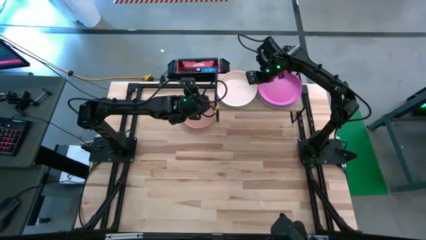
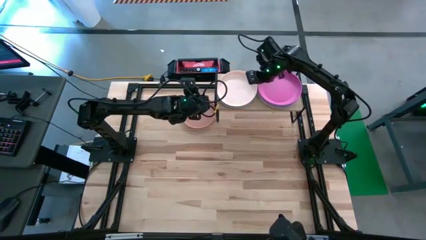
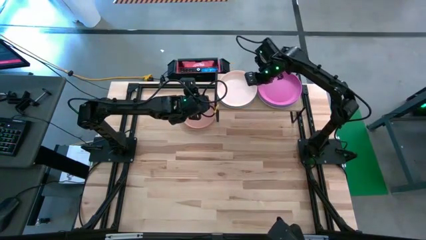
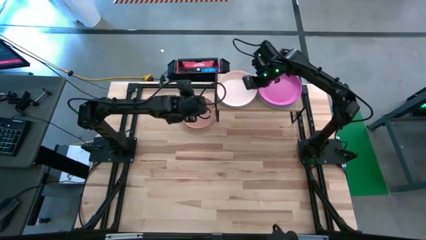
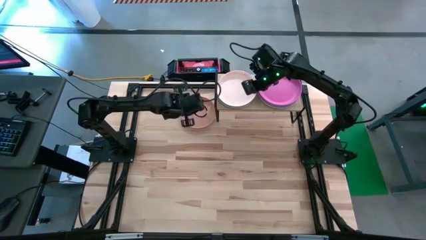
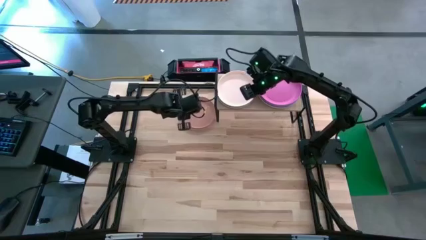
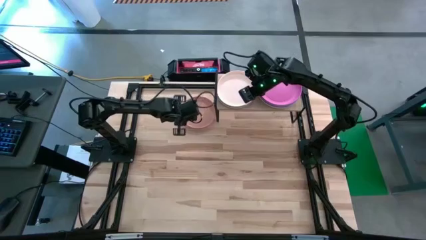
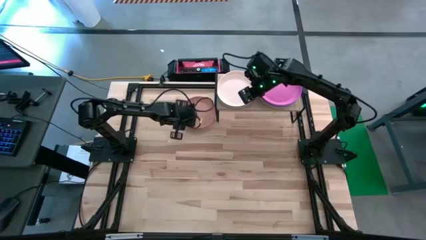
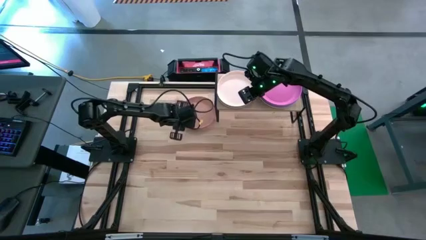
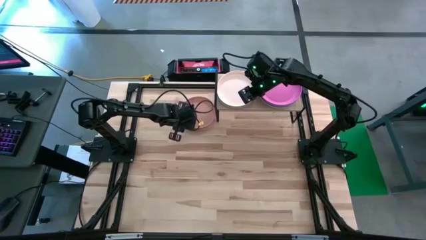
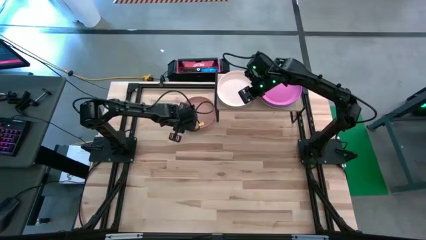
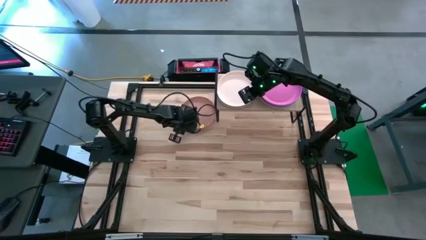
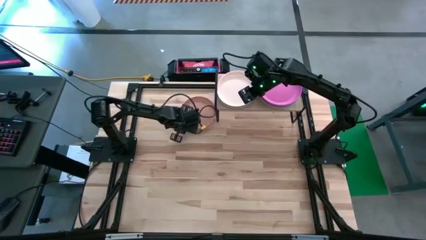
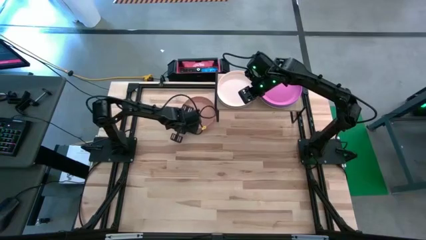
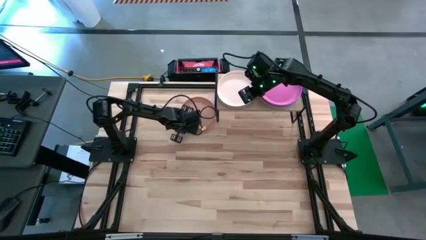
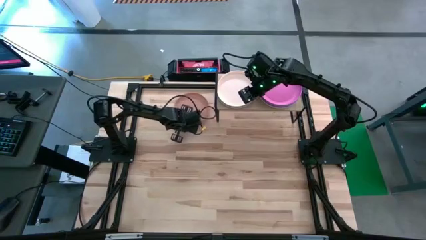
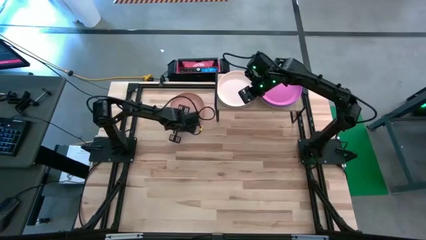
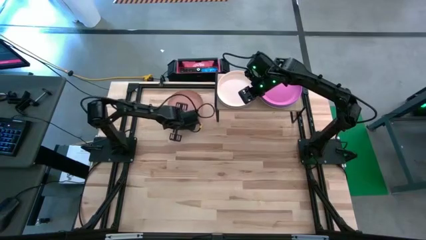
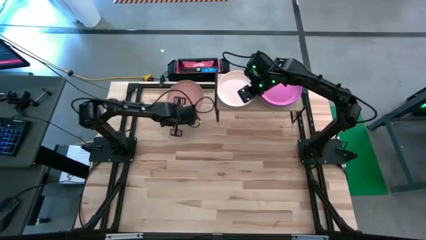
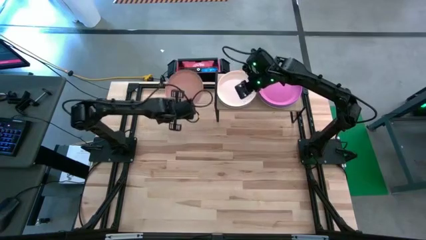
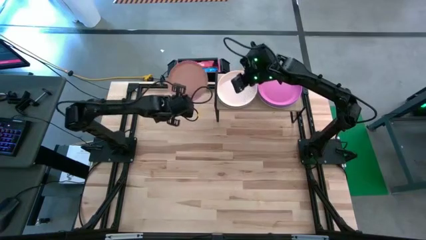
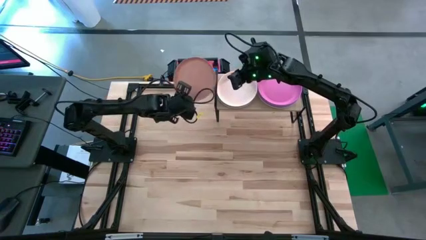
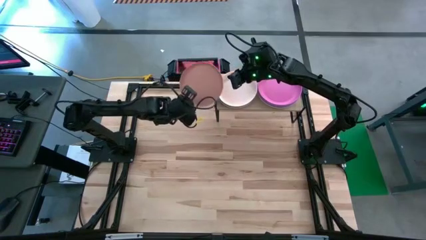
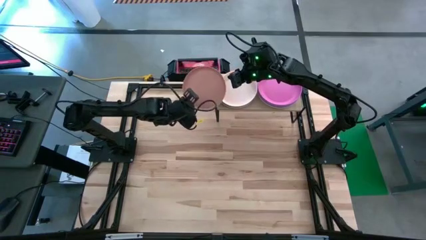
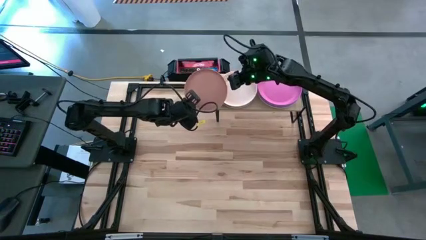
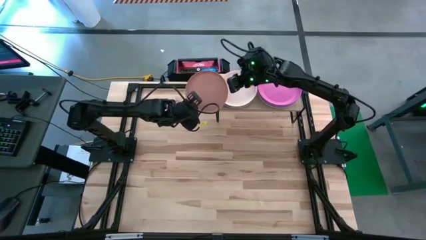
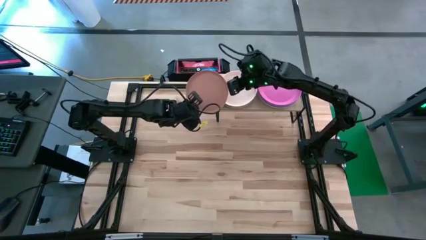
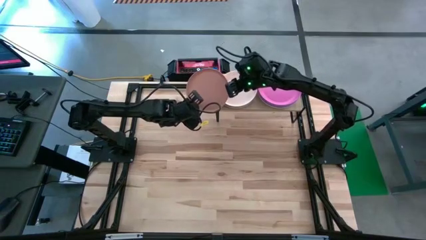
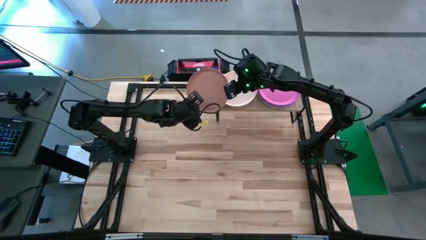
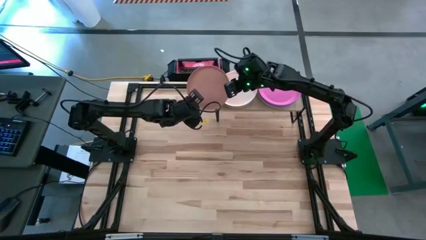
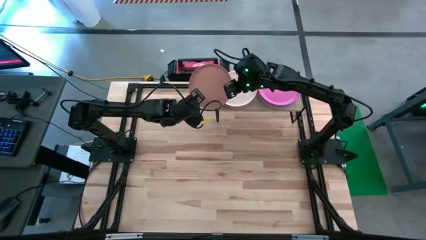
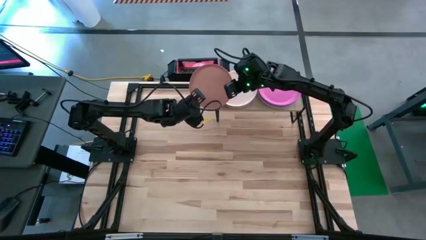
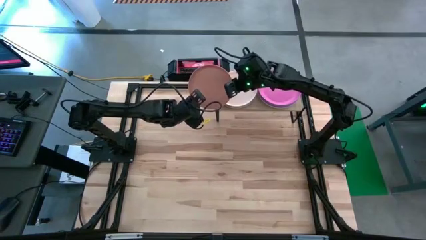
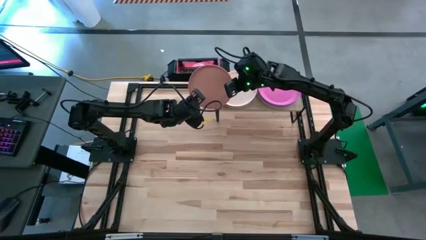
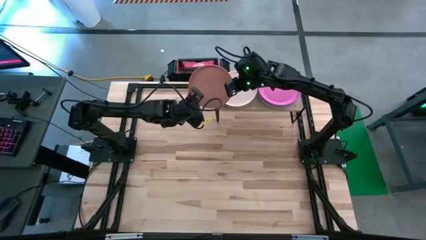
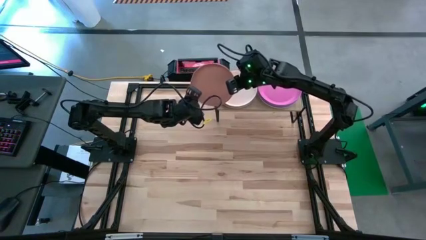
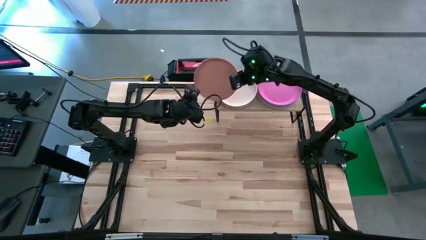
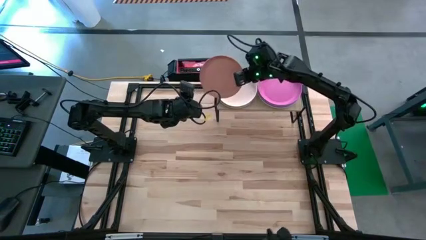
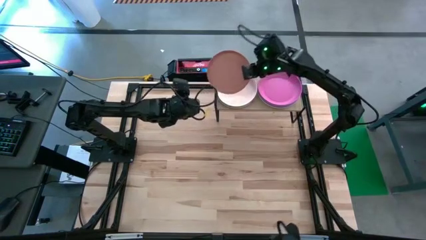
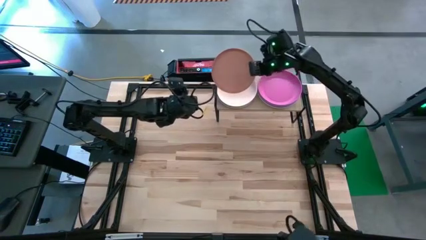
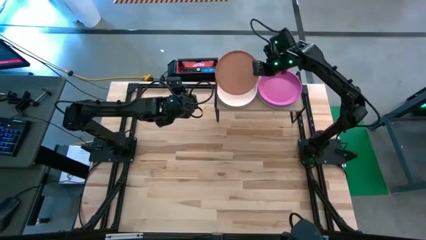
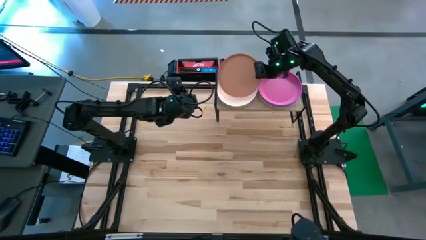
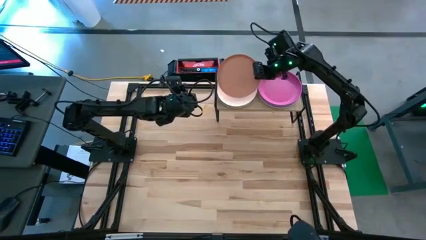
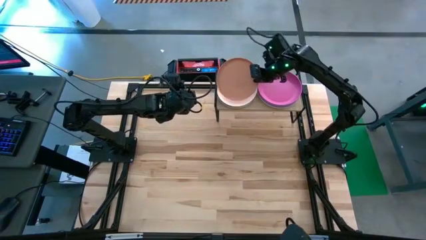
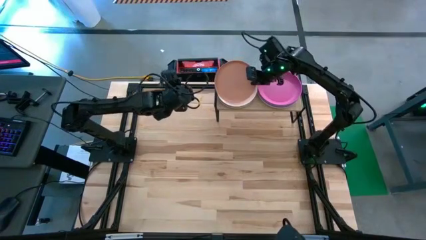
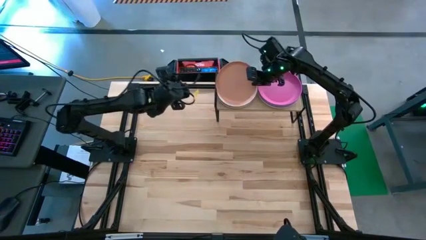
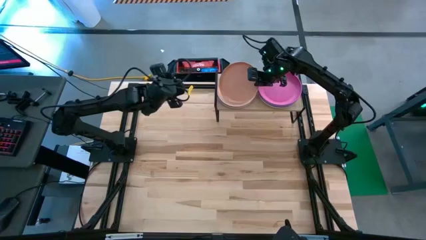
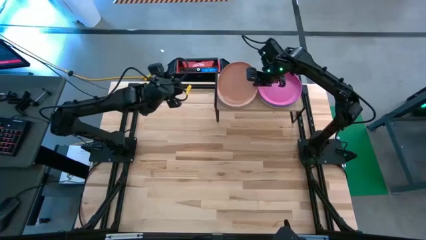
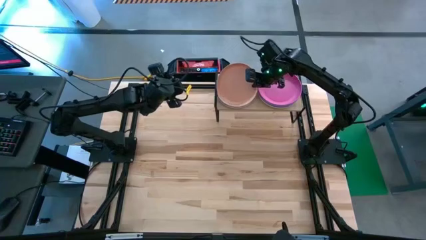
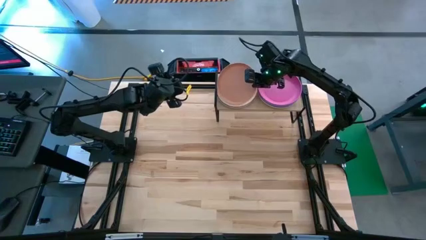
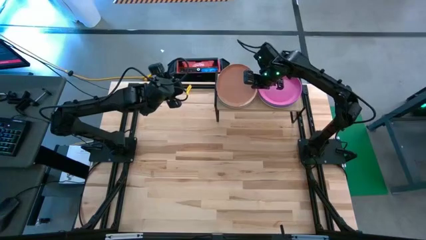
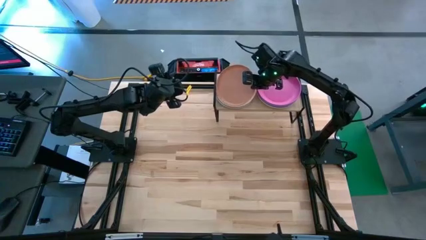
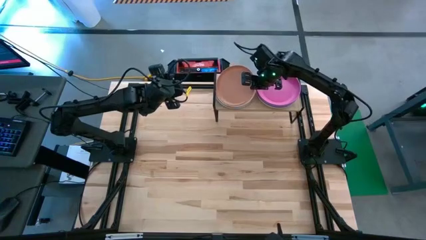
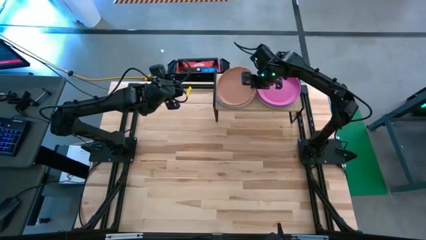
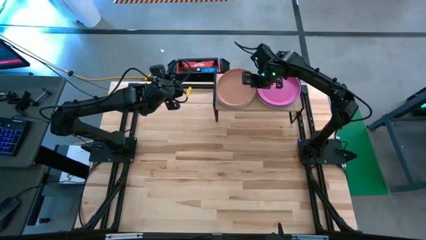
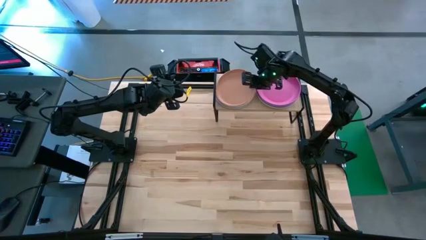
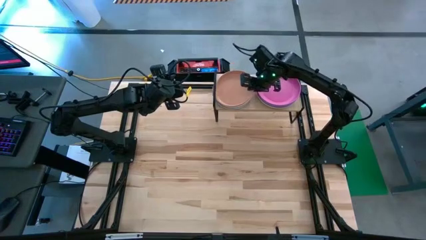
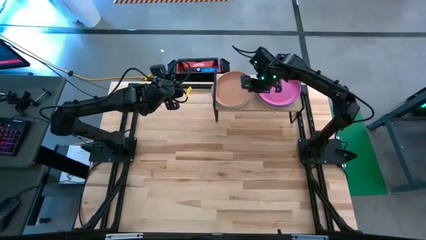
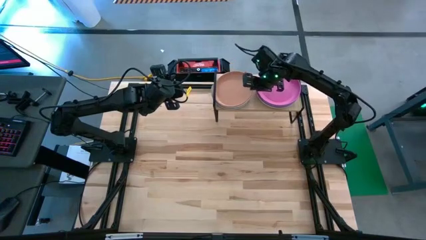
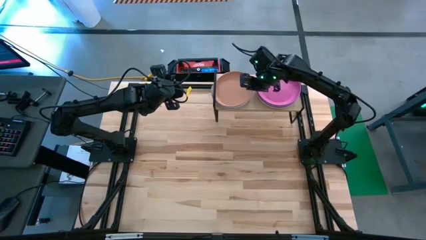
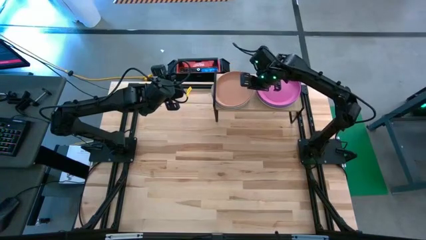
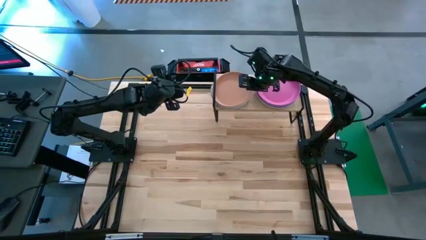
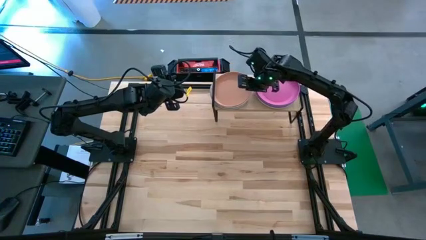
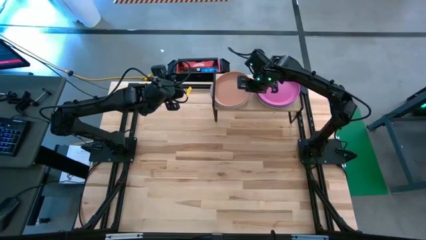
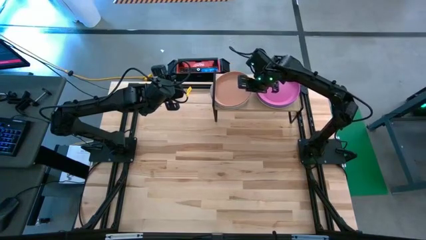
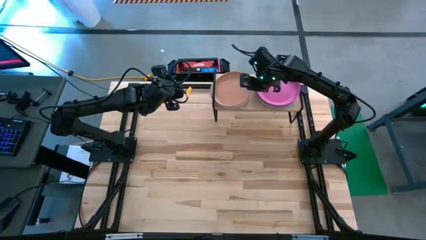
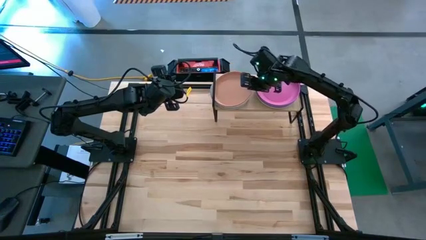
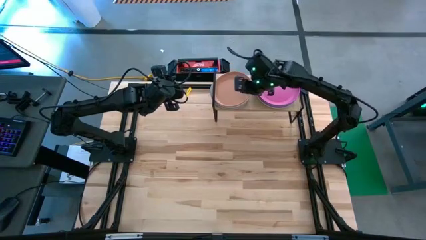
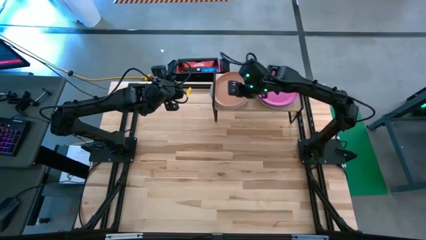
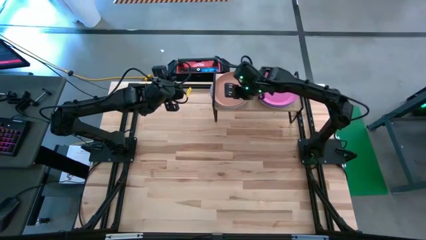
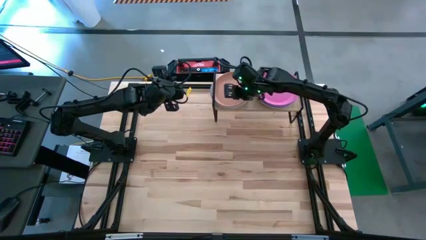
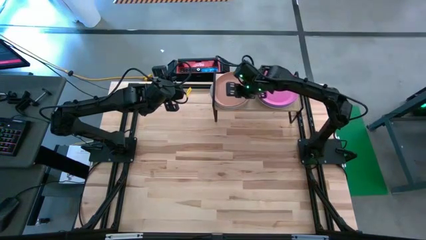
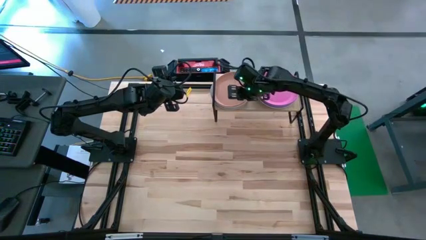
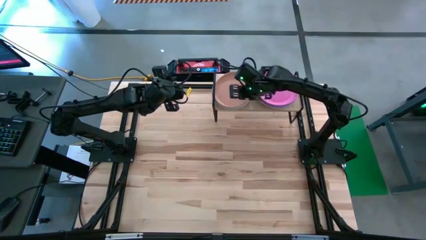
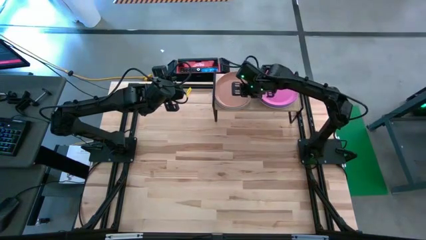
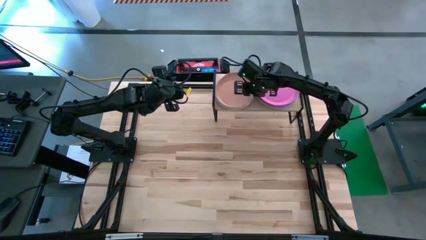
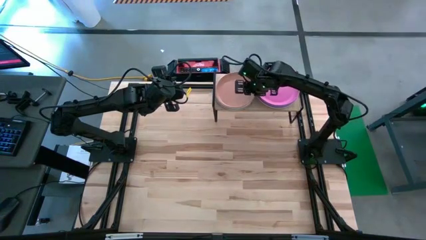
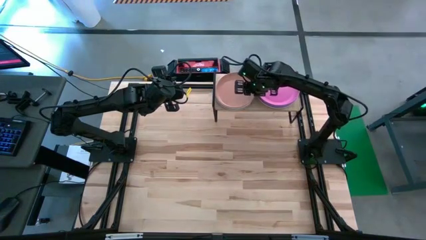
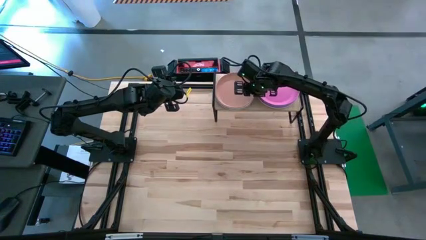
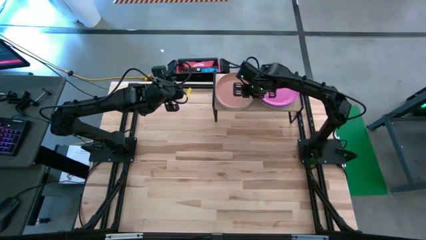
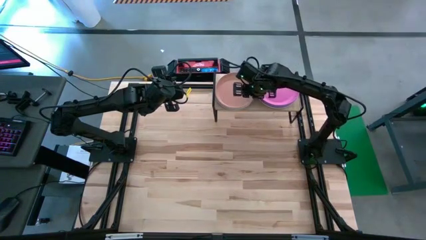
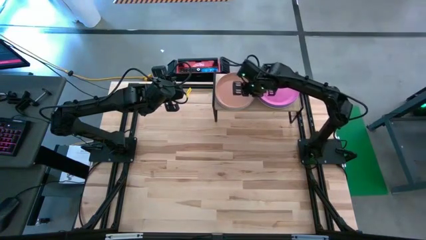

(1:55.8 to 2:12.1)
Task: Place and stack plates onto a shelf
Stack the brown plate on top of the white plate on the shelf
